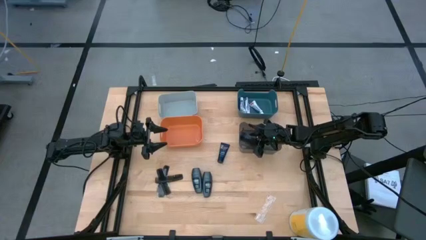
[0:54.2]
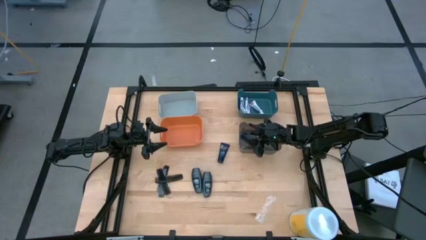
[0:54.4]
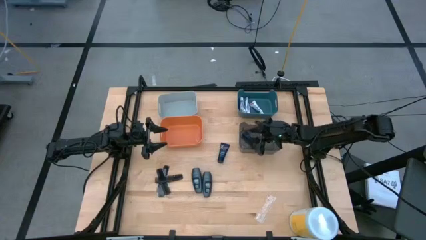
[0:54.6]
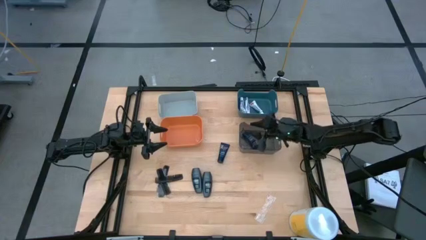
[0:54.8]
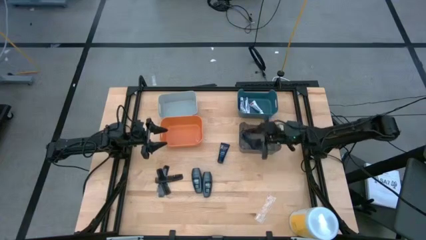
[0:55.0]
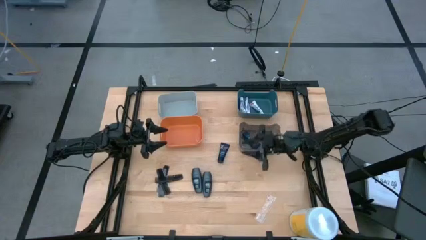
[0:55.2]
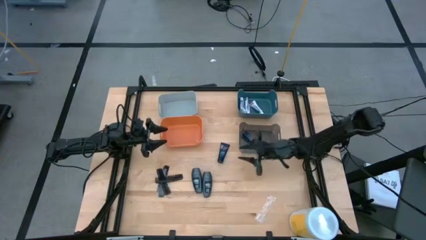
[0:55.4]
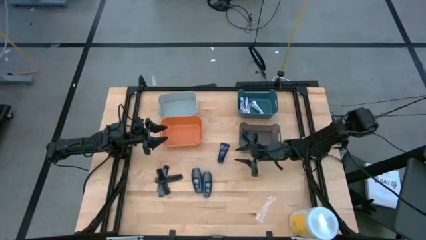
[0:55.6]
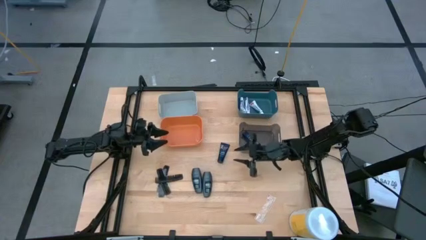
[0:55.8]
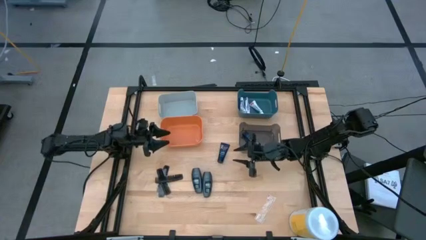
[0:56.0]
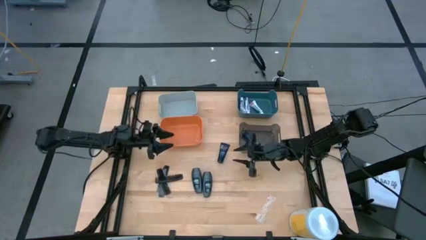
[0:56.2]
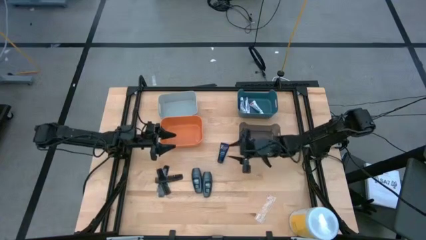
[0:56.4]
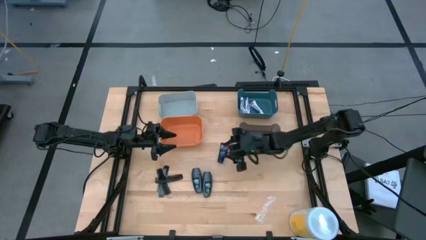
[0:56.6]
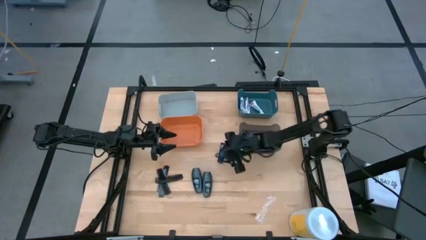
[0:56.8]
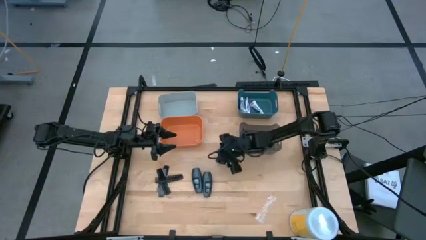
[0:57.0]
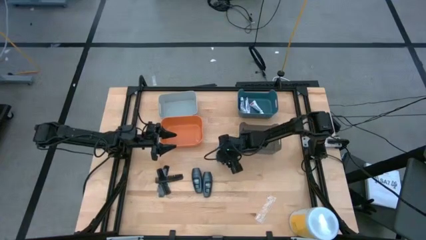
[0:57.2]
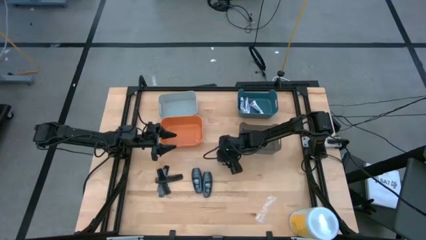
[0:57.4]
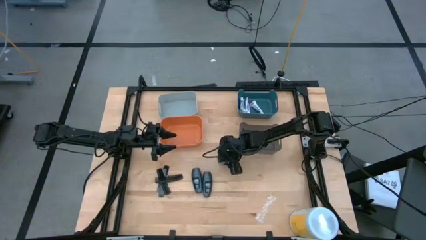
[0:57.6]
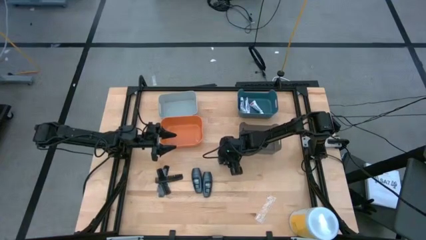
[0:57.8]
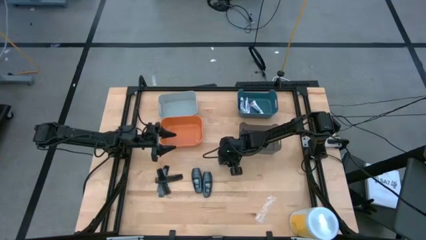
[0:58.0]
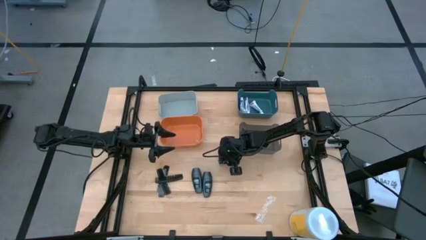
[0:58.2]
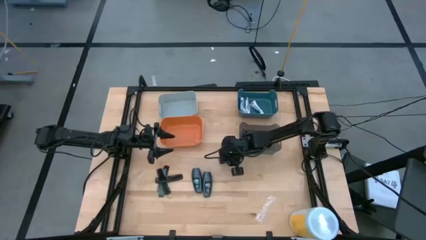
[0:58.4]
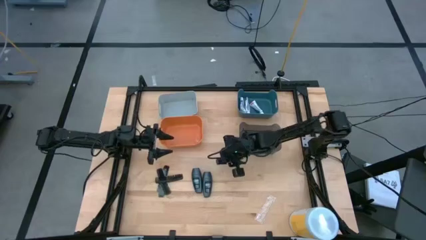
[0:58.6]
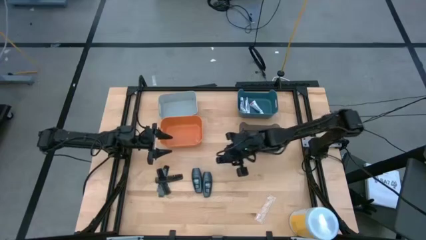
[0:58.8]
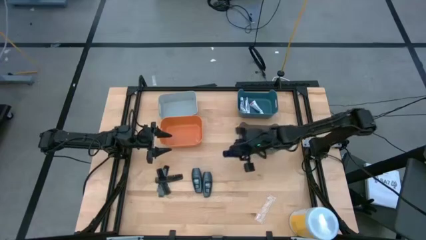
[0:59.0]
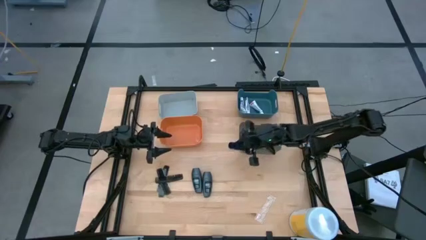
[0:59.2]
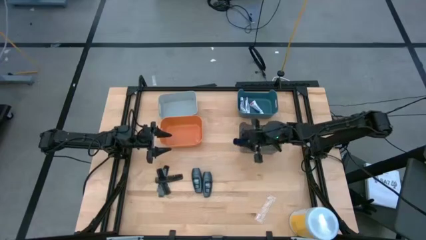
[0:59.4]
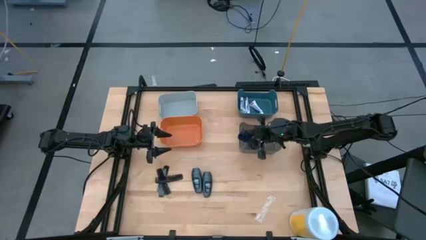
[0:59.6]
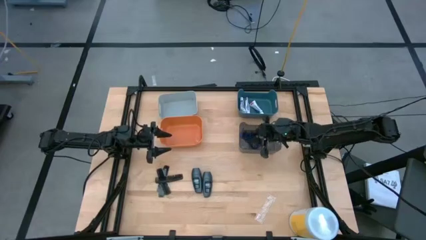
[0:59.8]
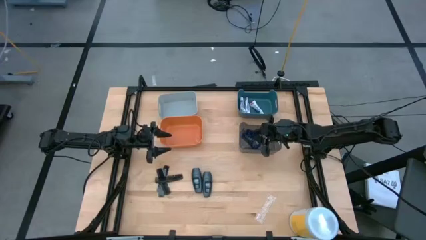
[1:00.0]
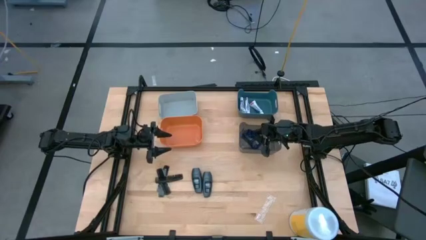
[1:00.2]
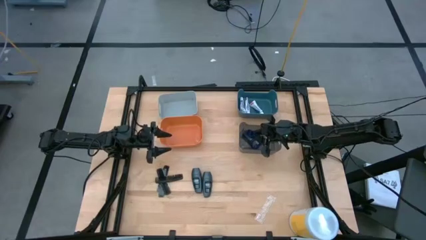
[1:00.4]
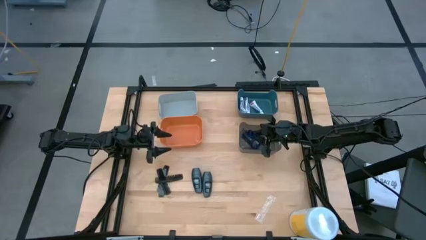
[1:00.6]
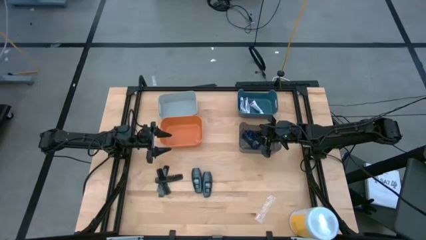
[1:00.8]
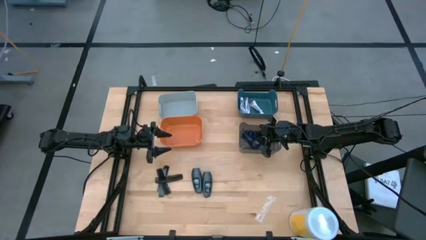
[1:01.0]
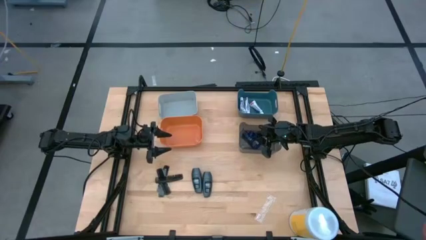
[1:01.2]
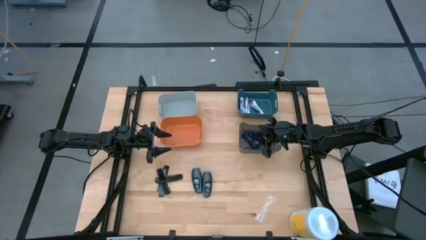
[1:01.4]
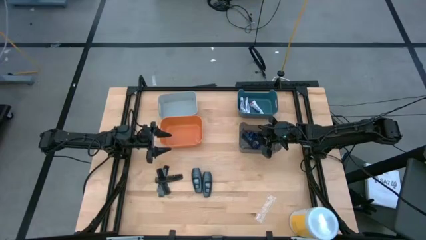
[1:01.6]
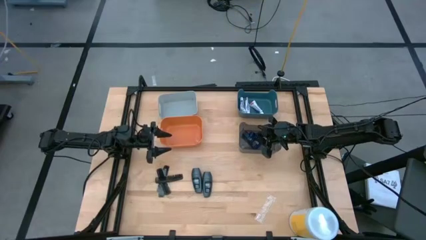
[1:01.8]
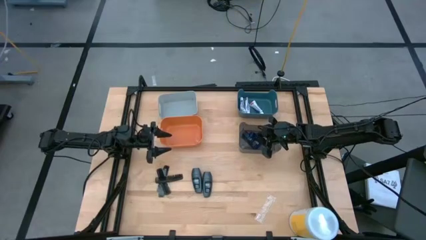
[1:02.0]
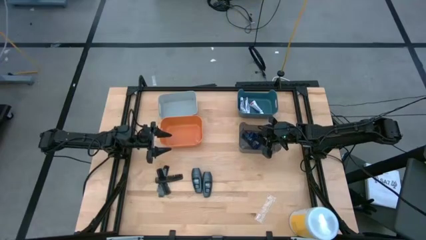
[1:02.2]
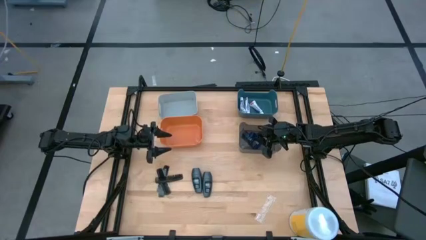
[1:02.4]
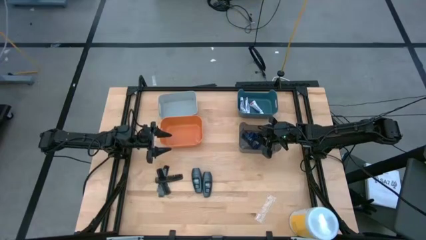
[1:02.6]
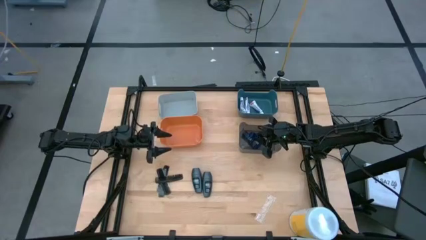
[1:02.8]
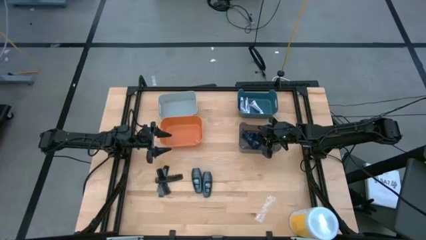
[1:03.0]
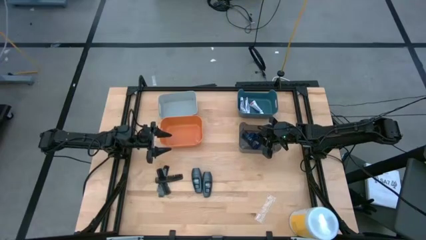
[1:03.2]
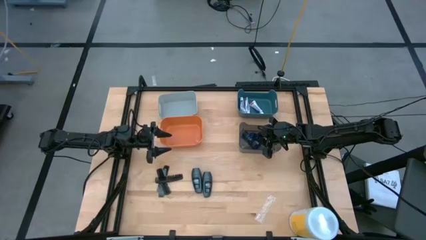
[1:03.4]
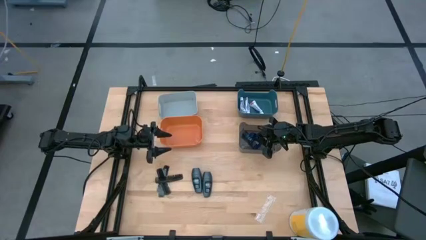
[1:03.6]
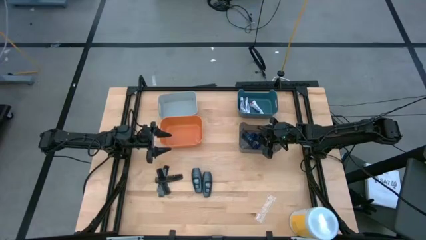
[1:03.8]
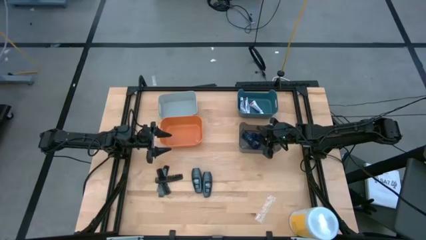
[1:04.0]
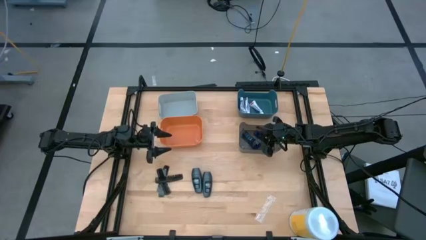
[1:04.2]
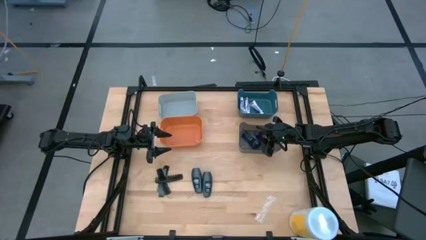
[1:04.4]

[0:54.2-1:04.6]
Task: Pick & Place Travel size toiletries
Put the blue shave cream into the black bin

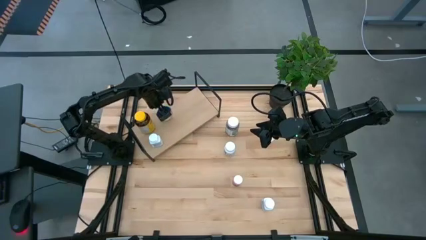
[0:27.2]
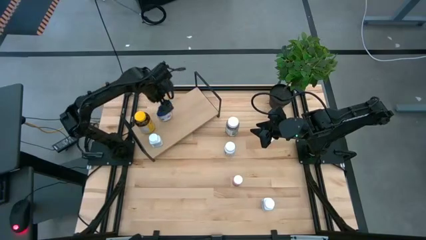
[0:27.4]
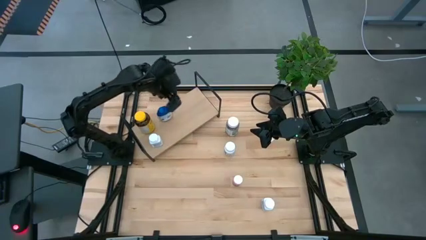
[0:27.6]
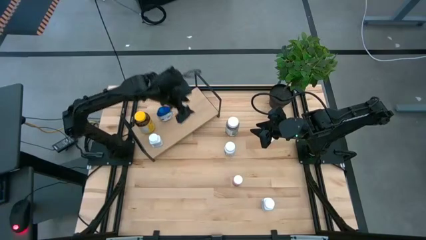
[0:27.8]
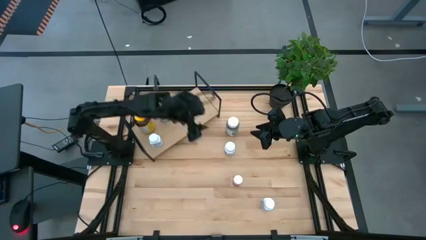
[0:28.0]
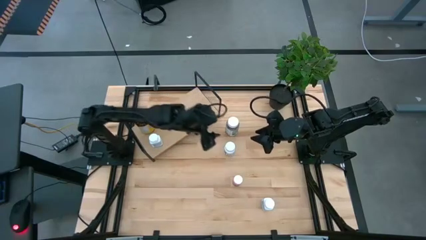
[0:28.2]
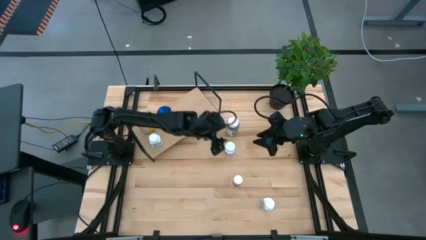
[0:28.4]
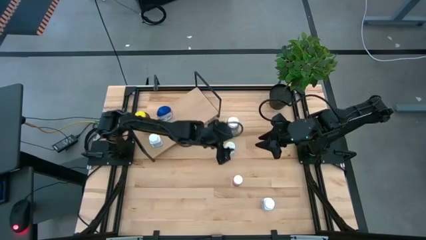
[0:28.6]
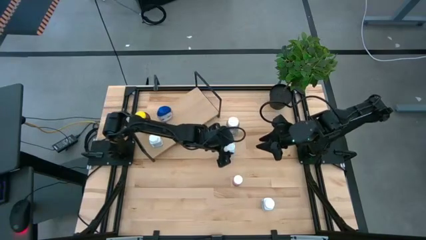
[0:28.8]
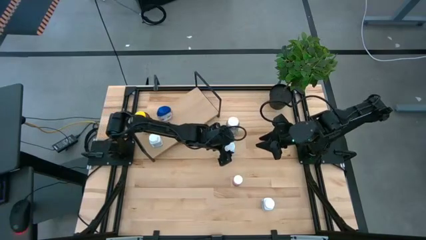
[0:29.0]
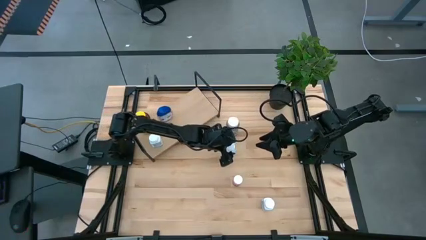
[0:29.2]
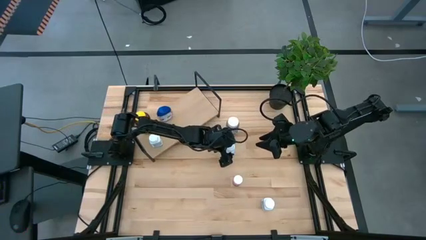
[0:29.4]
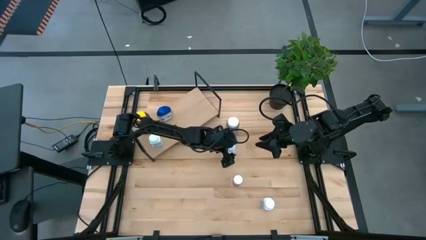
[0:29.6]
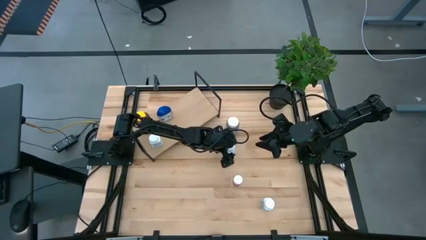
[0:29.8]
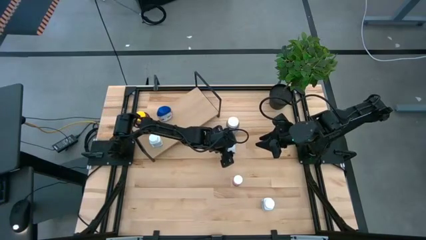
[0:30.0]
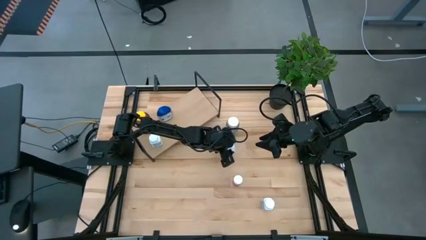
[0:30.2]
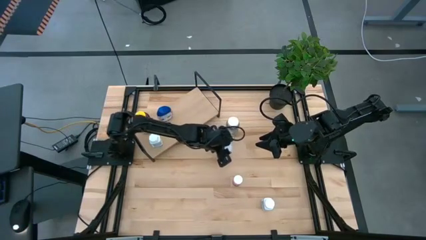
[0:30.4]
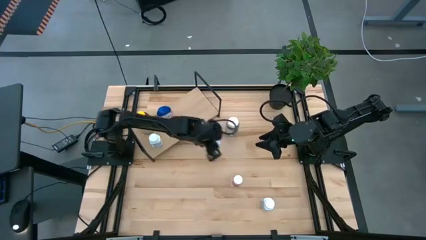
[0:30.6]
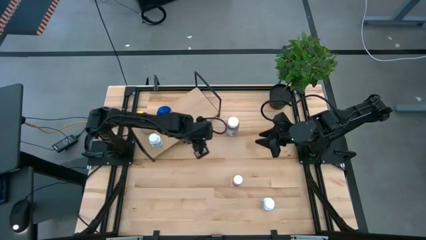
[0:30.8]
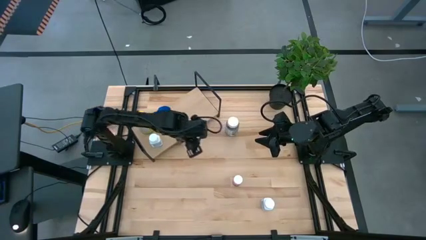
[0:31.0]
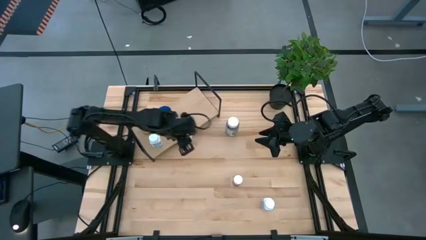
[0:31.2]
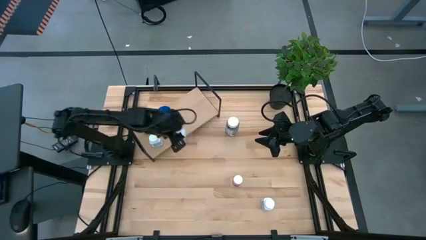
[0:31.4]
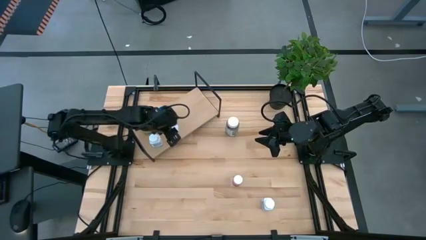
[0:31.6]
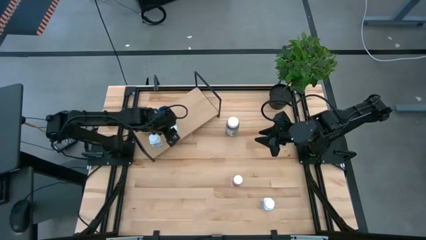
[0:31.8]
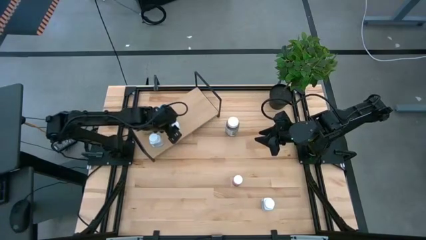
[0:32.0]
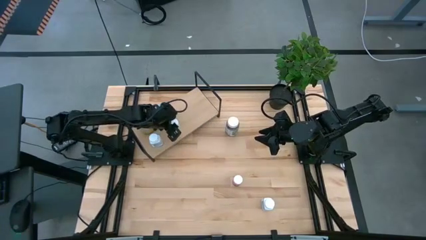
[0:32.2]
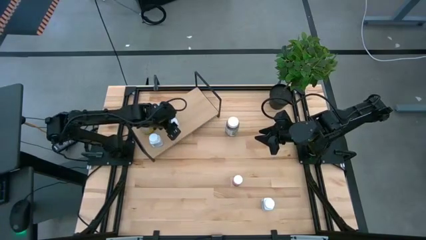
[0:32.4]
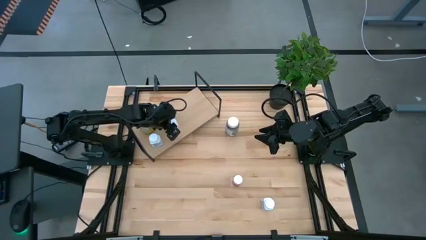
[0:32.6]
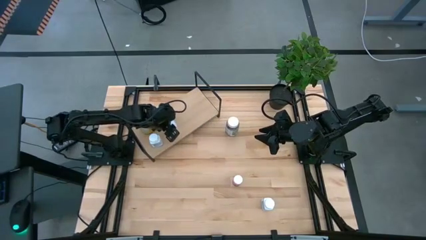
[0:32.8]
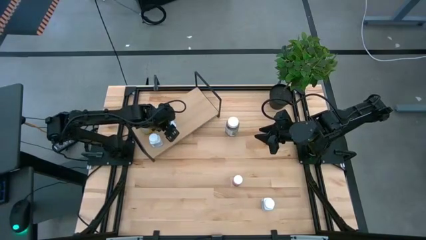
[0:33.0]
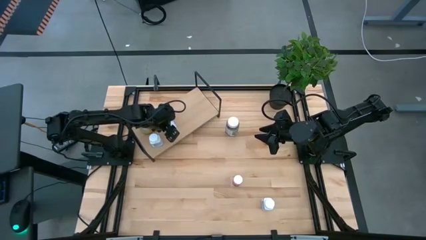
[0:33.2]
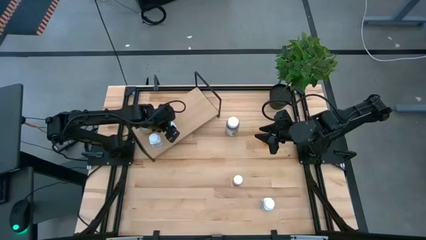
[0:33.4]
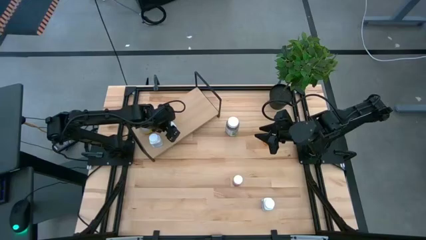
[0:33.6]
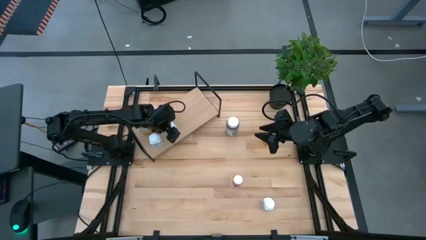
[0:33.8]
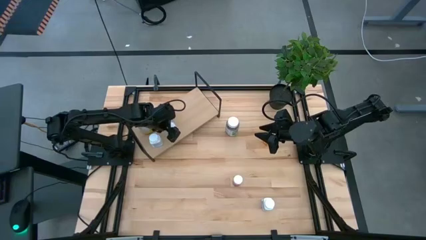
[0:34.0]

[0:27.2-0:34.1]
Task: Pick and place medicine bottles onto shelf by color
Put the yellow medicine bottle on the shelf
